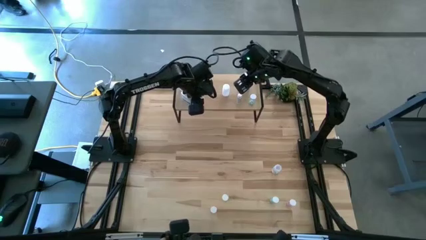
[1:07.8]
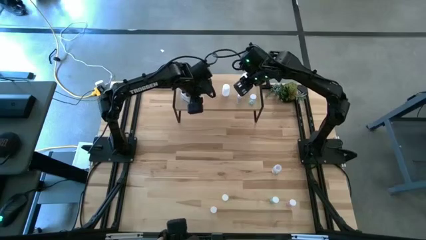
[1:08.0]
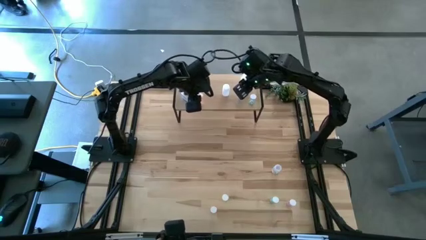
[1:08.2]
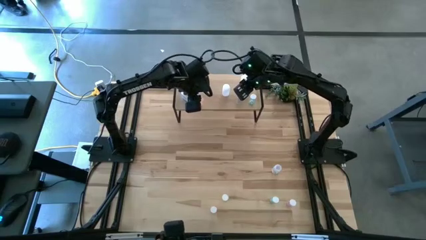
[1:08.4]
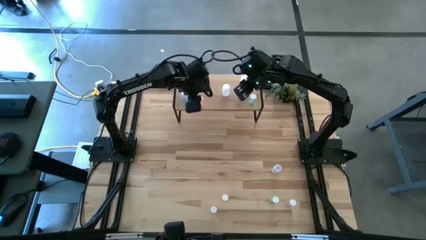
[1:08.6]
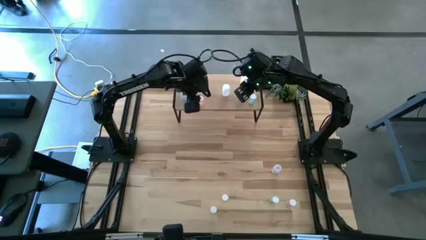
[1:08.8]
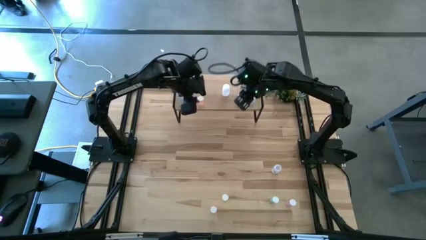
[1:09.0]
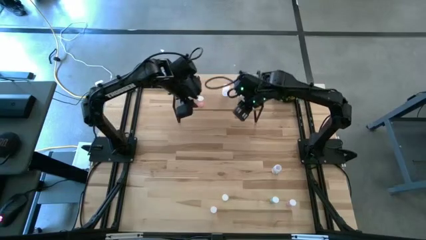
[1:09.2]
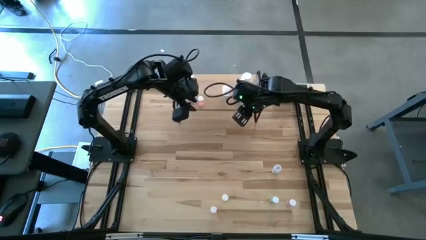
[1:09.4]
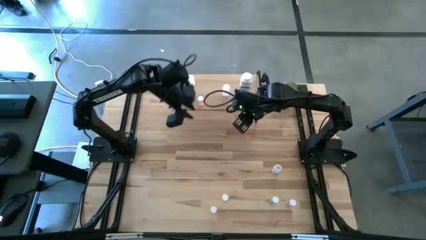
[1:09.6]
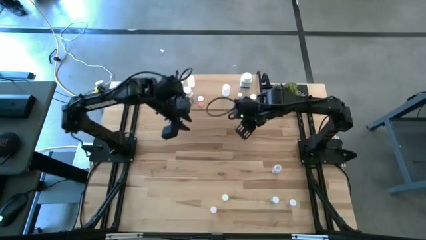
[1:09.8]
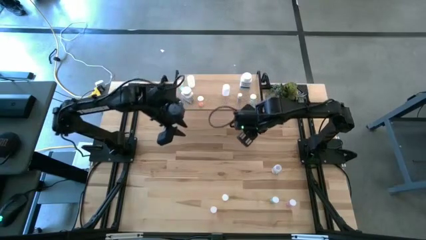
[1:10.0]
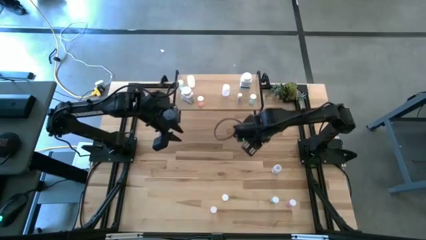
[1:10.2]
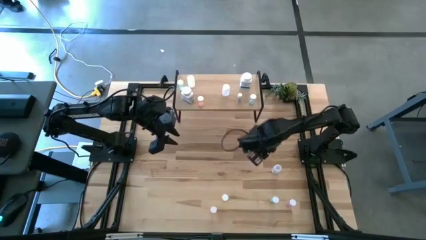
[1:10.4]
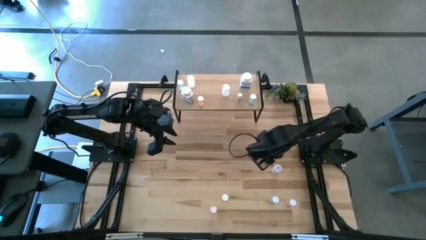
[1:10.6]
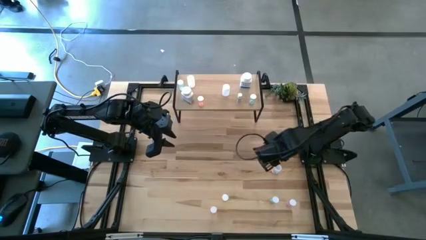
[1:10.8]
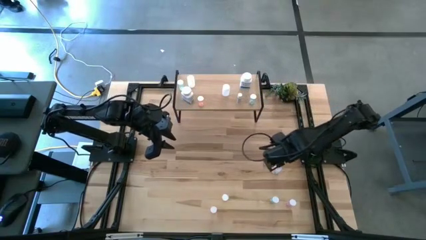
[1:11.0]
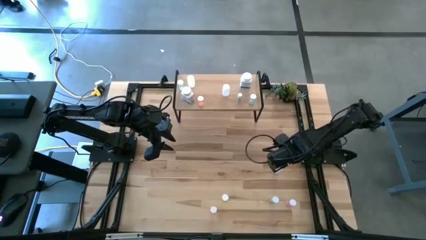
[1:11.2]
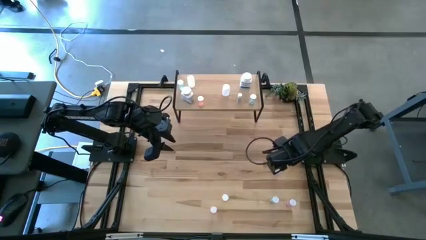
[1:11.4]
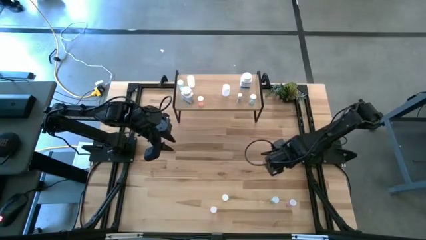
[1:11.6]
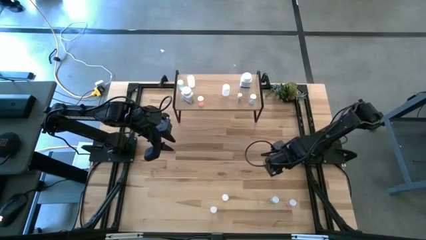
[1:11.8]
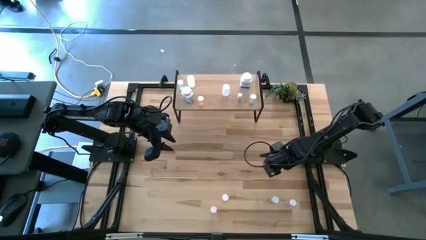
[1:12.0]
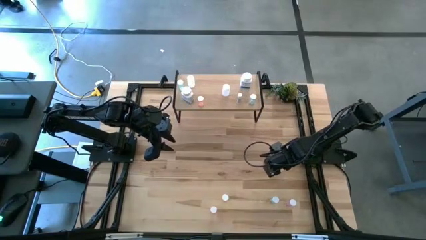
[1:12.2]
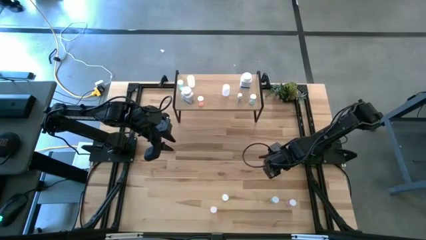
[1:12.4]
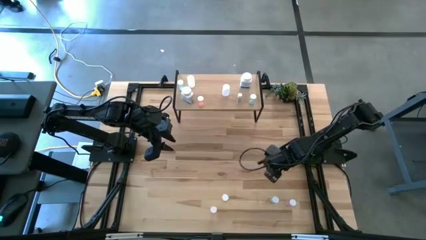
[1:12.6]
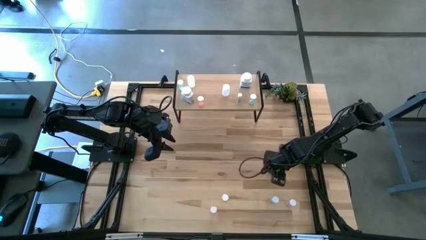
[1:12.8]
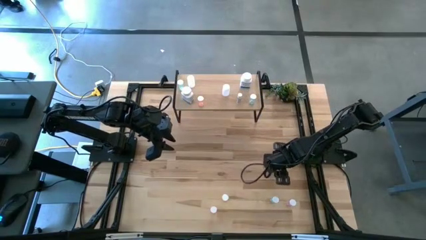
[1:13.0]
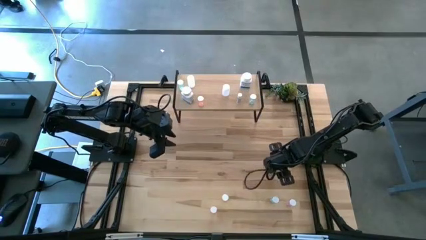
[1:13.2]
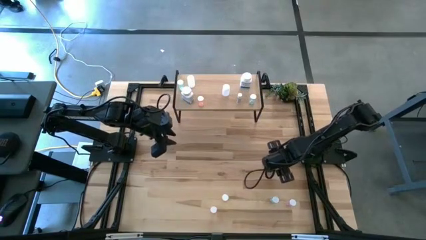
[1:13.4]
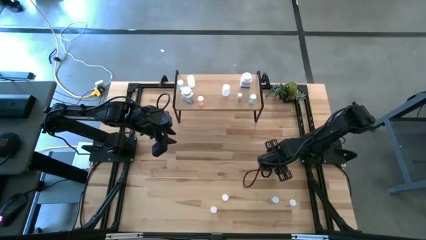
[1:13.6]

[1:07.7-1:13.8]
Task: Pick and place medicine bottles onto shelf by color
Put the transparent pill bottle on the shelf

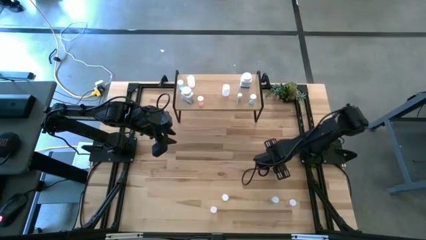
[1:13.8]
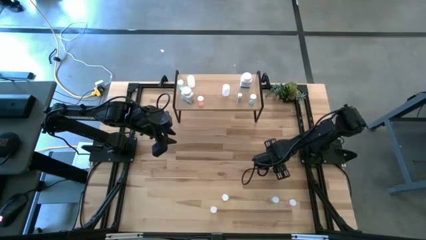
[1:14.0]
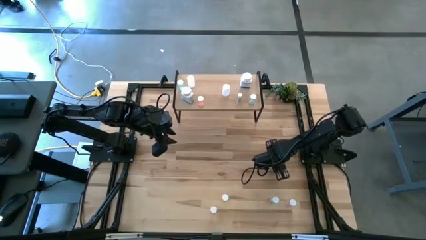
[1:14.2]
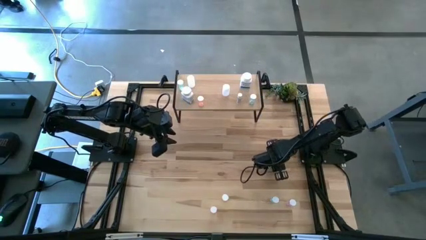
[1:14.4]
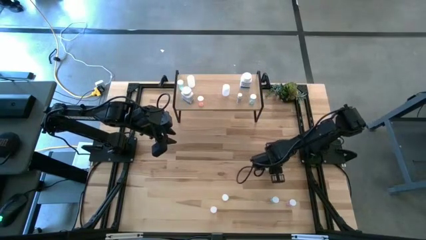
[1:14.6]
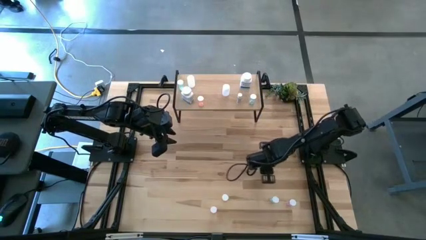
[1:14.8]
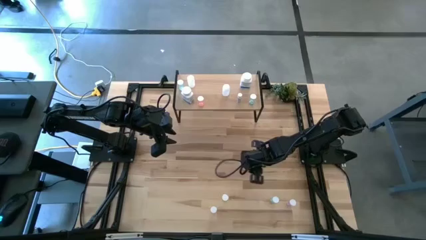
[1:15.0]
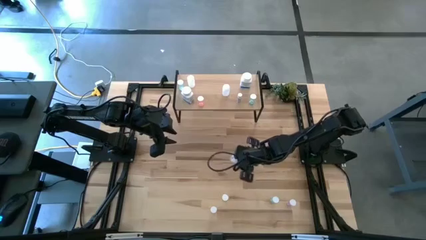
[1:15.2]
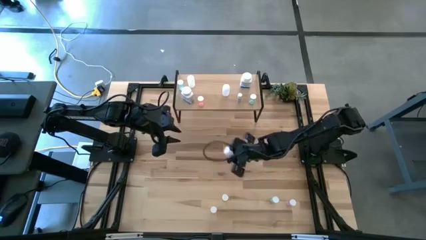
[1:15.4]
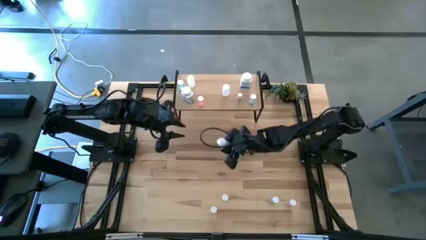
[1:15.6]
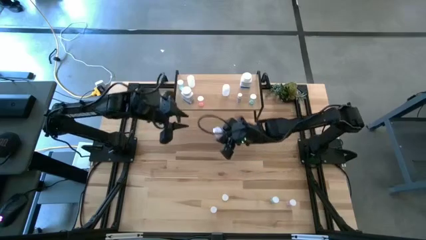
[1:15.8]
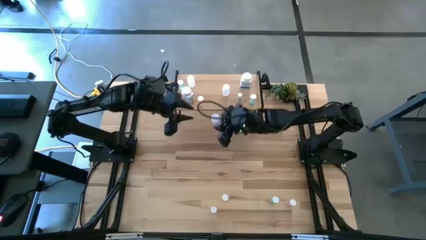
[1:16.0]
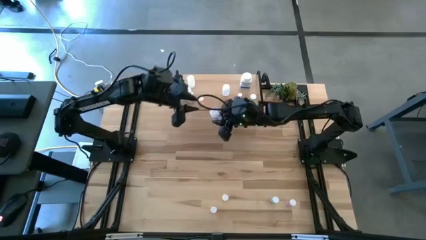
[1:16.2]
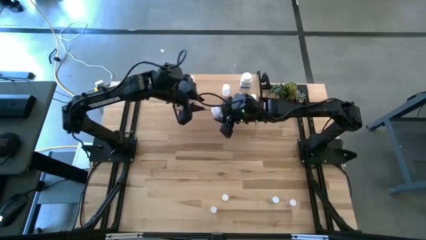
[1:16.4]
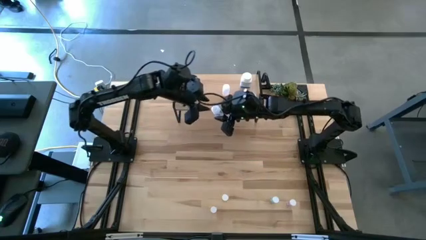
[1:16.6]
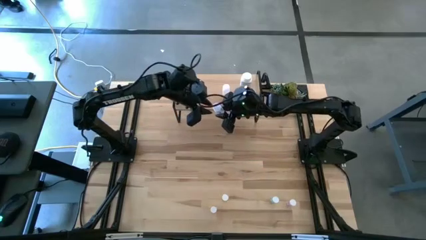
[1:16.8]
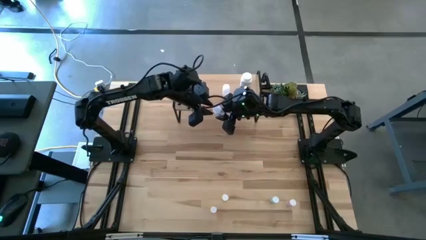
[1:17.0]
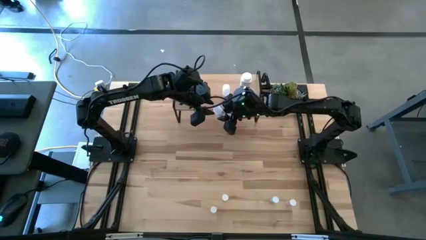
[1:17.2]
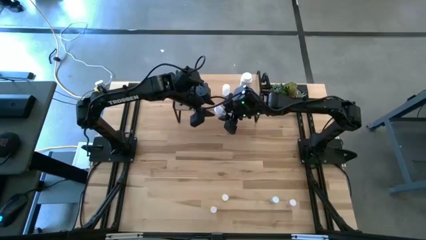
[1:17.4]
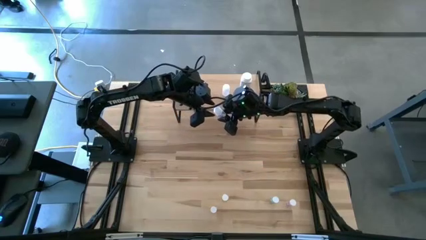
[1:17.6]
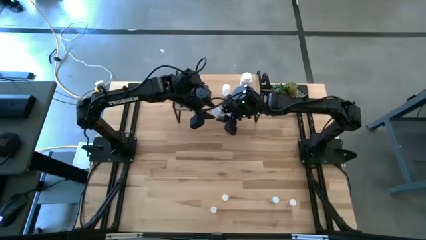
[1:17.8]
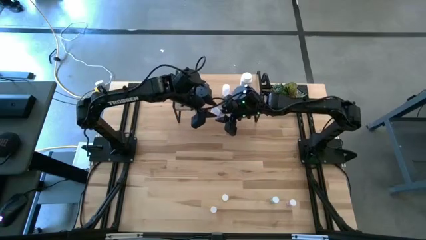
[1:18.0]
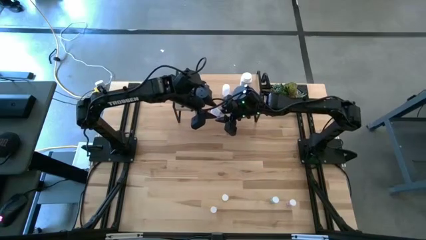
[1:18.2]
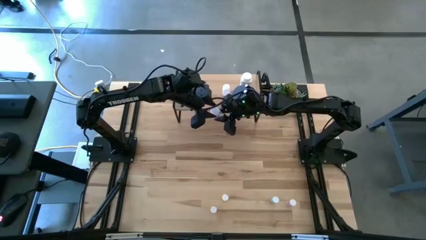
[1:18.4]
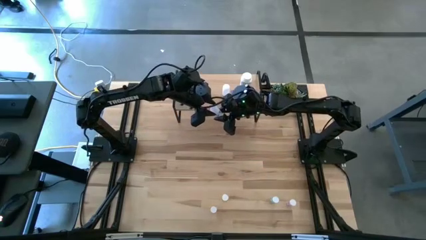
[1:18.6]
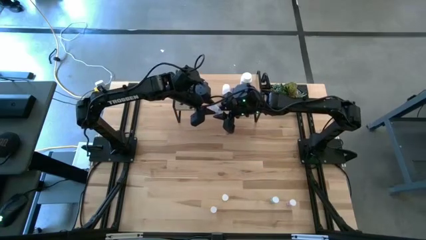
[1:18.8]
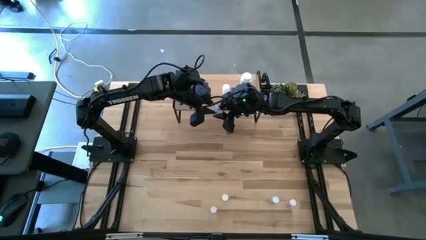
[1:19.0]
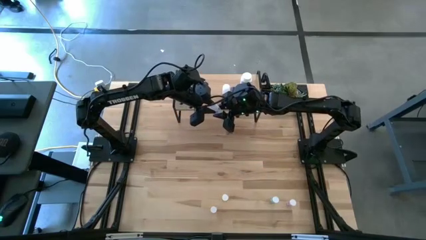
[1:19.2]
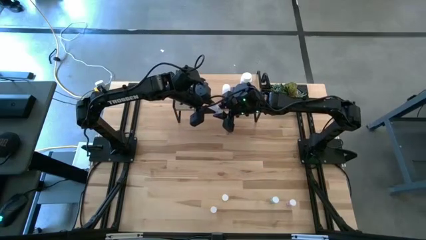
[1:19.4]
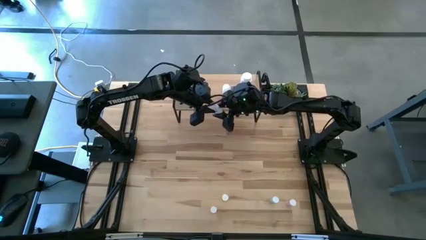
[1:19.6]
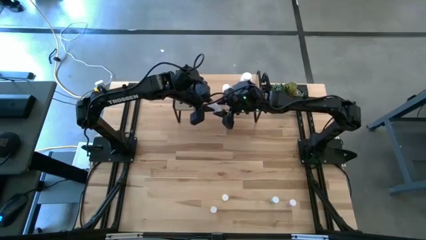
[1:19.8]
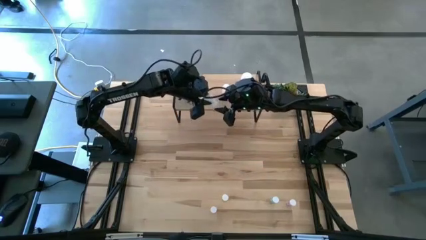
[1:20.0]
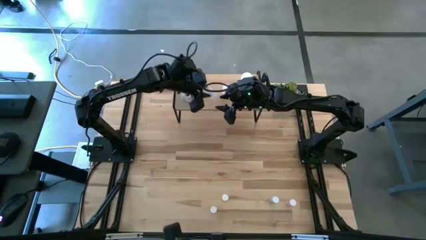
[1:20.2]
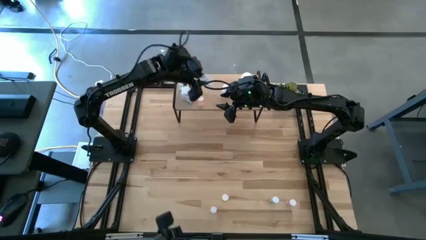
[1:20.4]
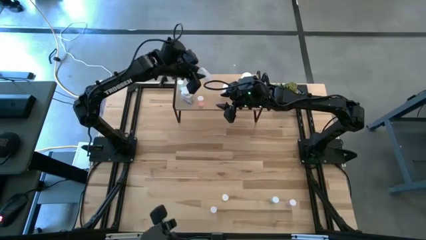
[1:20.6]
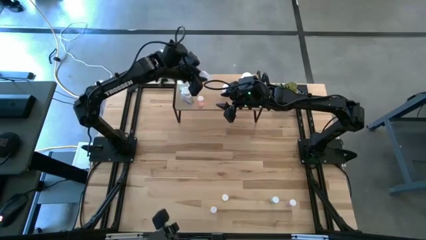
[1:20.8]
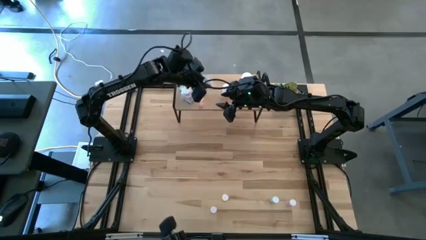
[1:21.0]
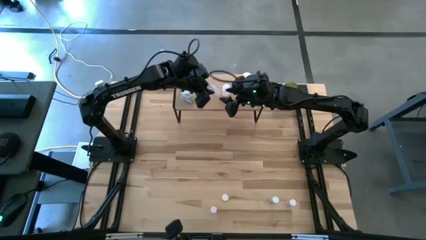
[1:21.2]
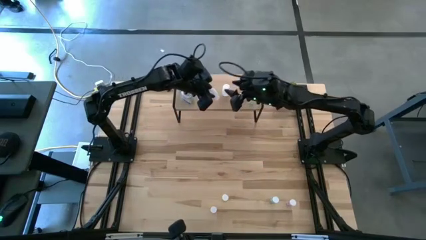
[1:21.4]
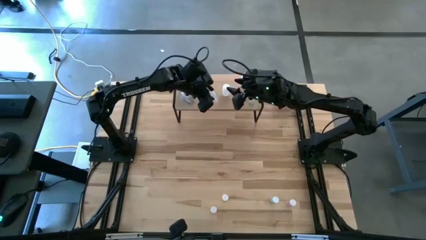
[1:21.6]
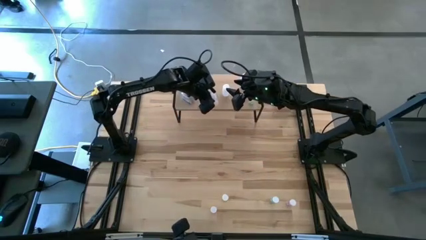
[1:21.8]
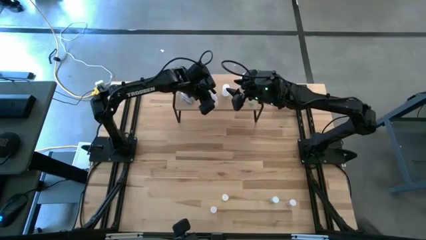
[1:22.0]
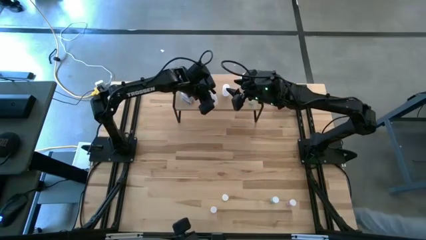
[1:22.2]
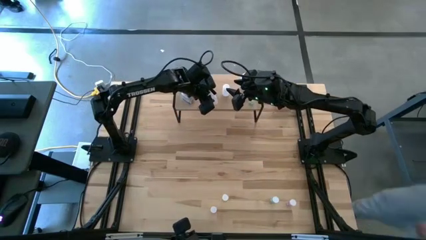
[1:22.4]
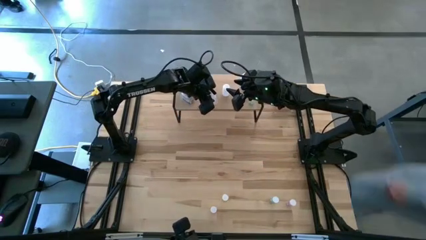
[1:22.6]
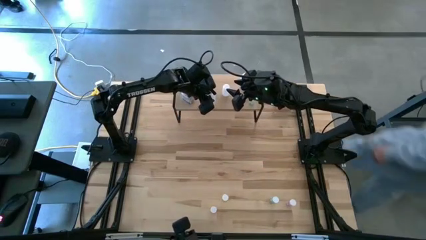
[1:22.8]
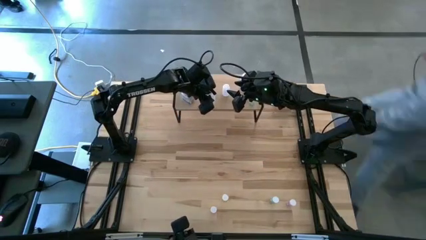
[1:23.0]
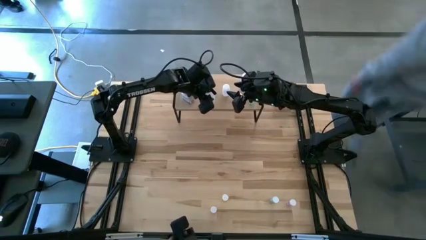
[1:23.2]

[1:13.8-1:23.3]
Put the transparent pill bottle on the shelf
